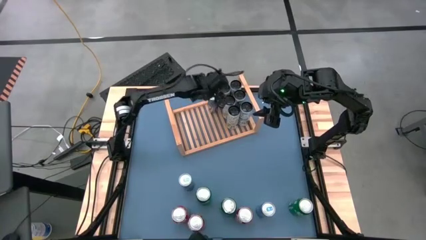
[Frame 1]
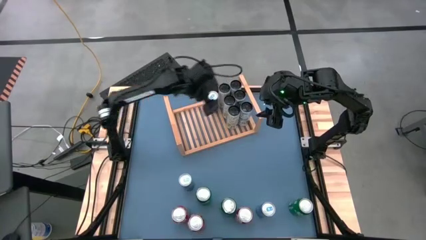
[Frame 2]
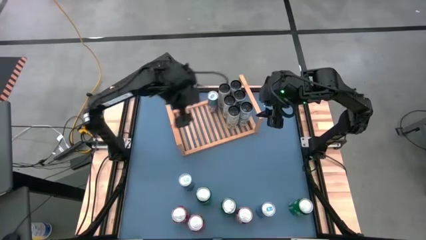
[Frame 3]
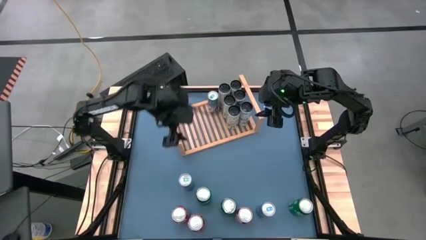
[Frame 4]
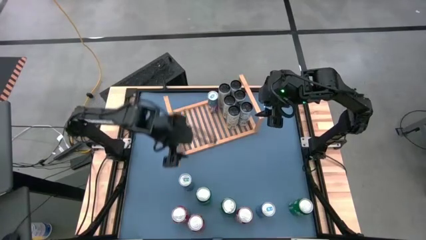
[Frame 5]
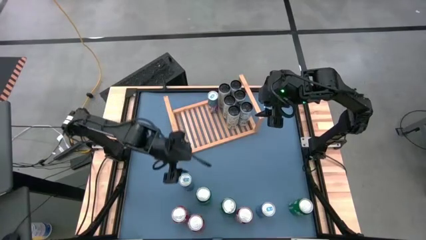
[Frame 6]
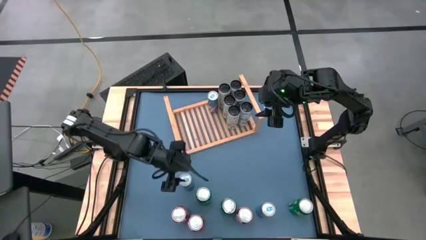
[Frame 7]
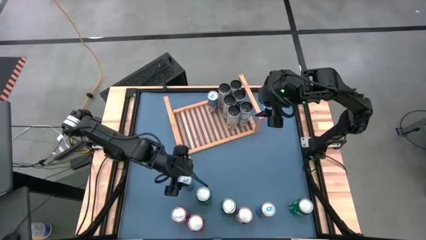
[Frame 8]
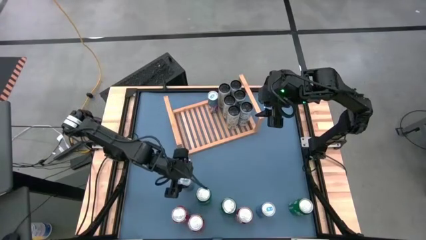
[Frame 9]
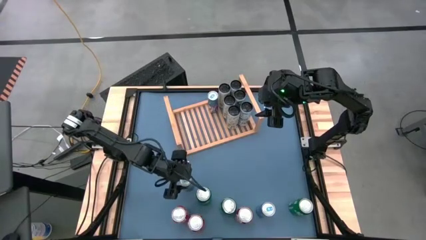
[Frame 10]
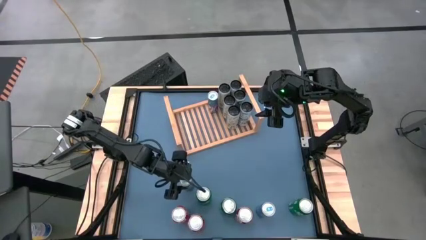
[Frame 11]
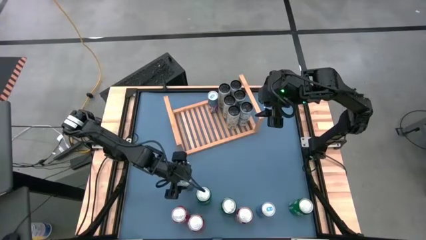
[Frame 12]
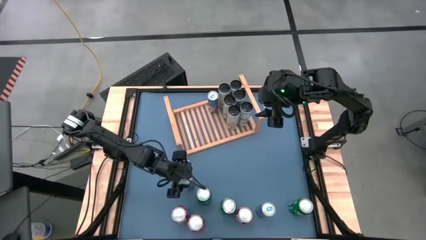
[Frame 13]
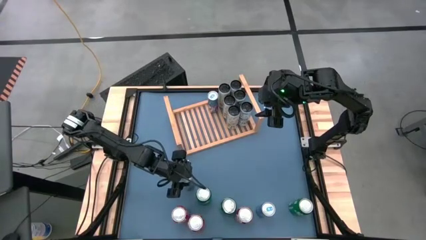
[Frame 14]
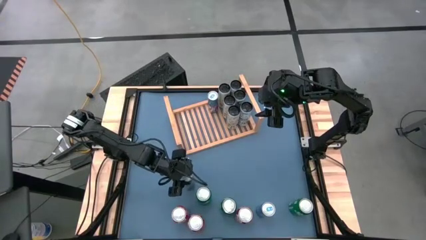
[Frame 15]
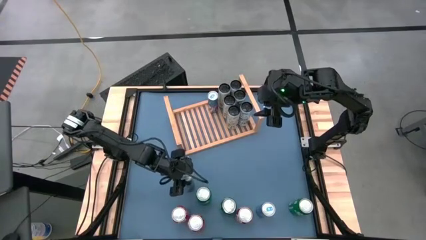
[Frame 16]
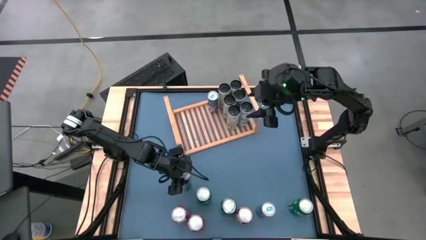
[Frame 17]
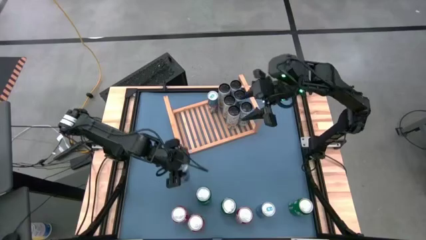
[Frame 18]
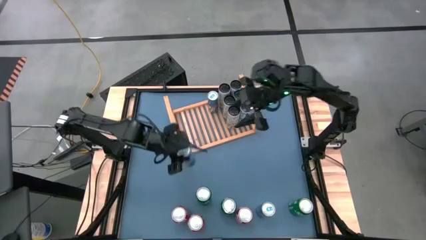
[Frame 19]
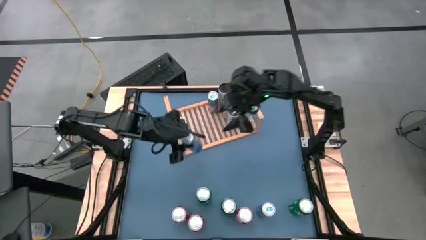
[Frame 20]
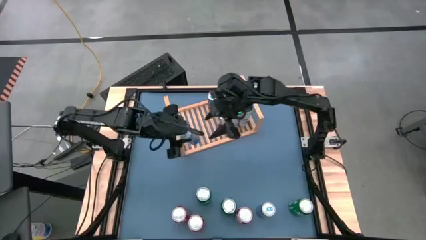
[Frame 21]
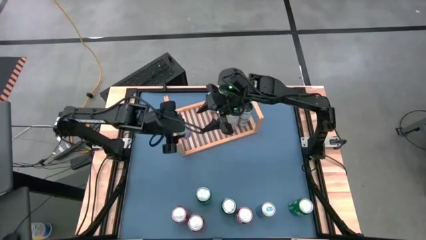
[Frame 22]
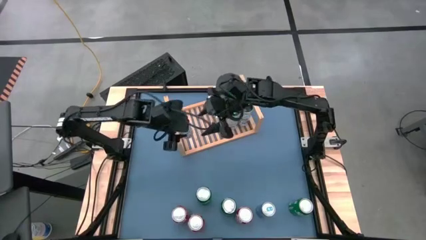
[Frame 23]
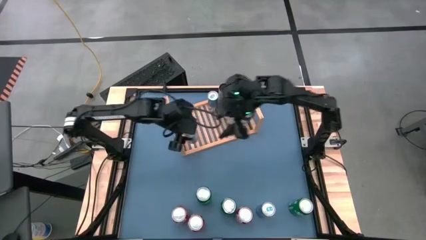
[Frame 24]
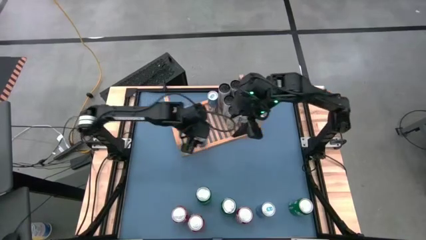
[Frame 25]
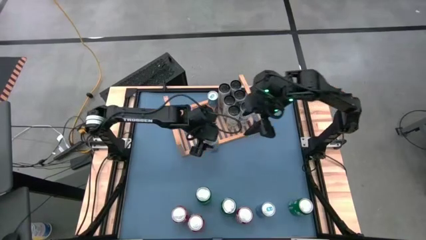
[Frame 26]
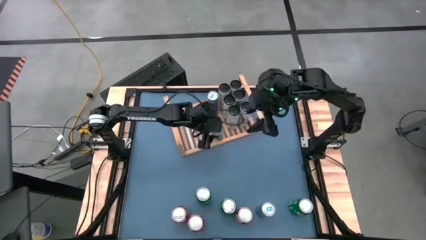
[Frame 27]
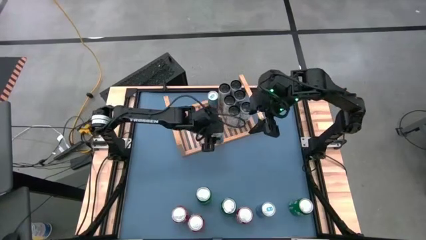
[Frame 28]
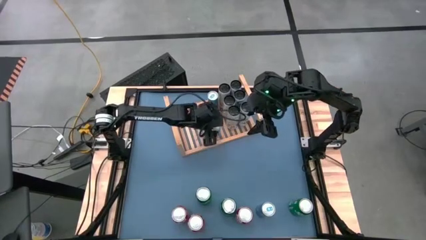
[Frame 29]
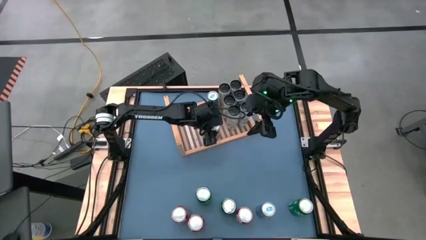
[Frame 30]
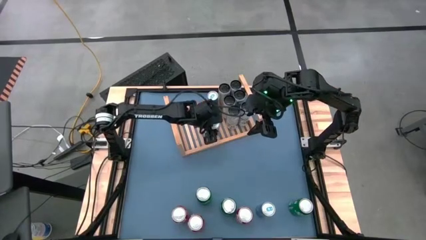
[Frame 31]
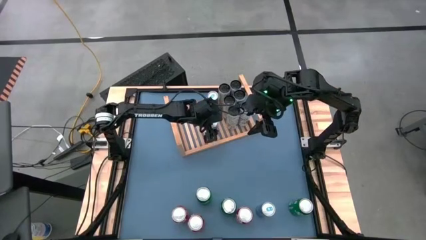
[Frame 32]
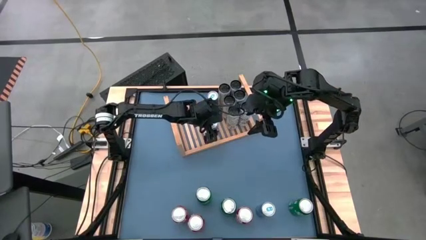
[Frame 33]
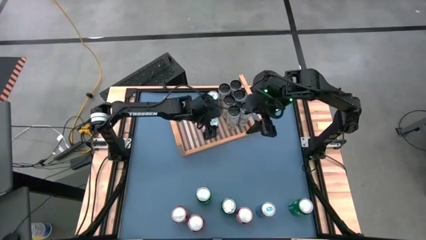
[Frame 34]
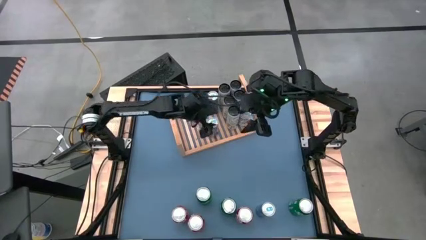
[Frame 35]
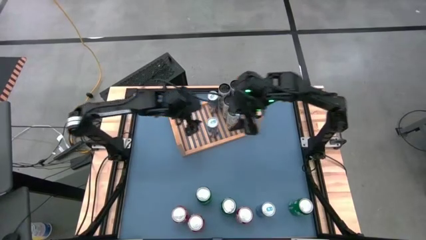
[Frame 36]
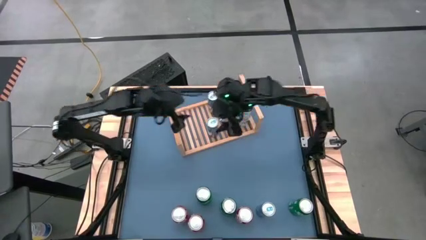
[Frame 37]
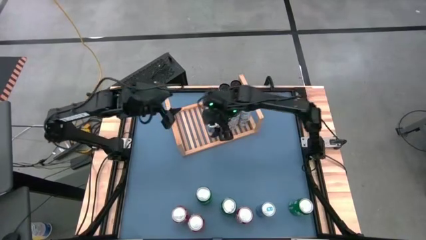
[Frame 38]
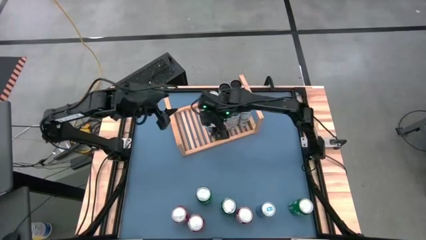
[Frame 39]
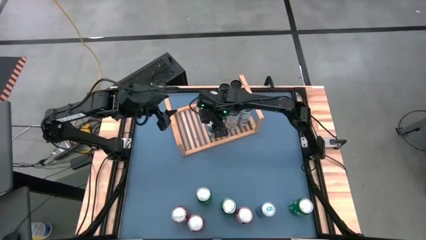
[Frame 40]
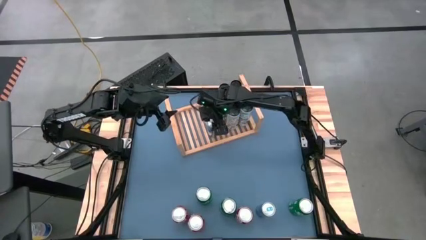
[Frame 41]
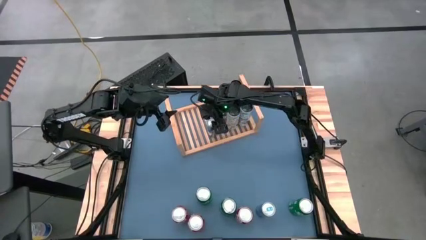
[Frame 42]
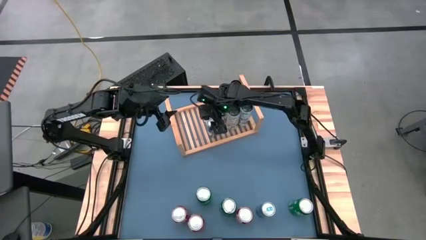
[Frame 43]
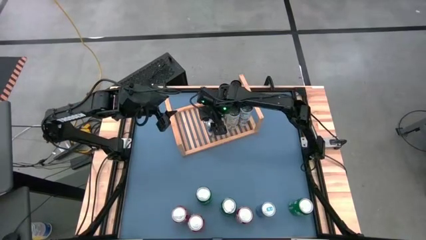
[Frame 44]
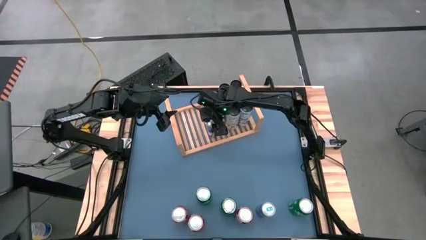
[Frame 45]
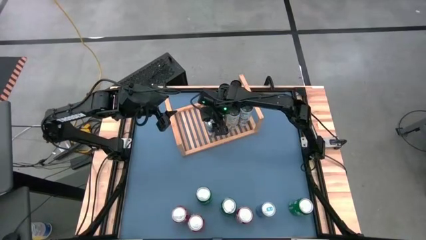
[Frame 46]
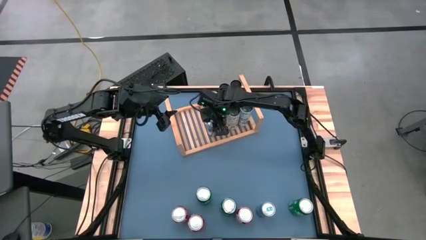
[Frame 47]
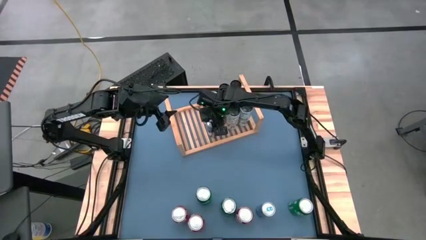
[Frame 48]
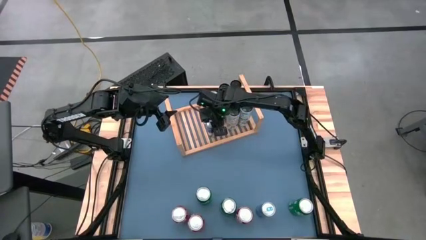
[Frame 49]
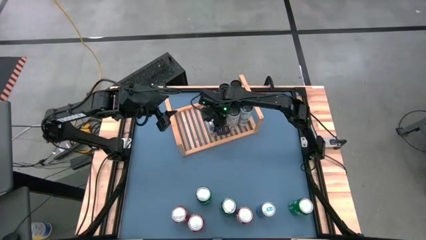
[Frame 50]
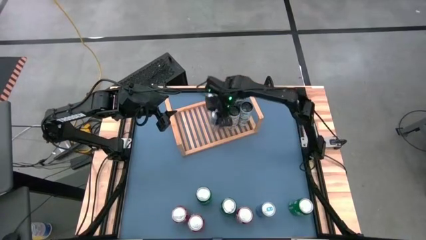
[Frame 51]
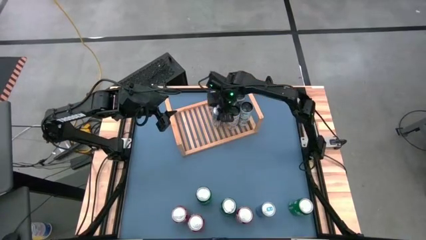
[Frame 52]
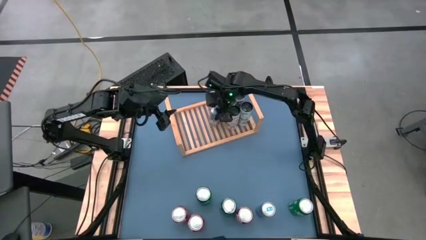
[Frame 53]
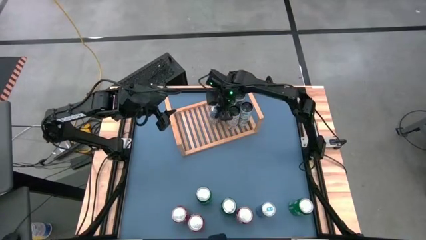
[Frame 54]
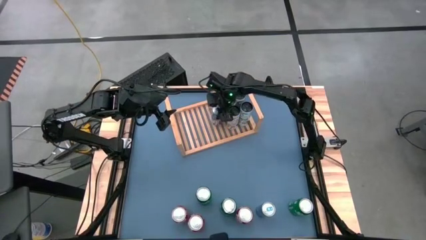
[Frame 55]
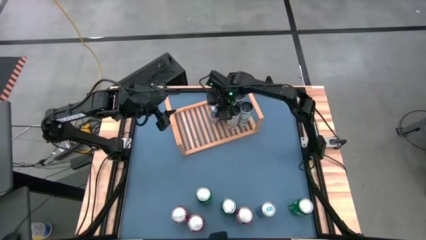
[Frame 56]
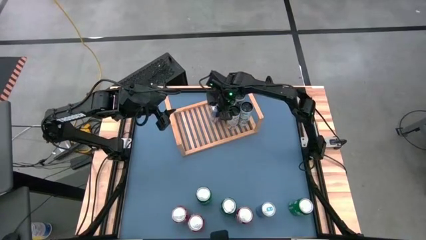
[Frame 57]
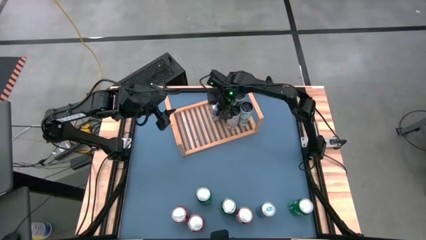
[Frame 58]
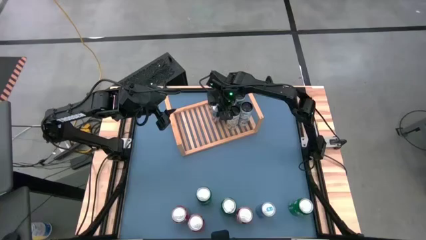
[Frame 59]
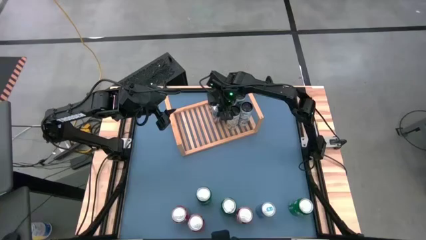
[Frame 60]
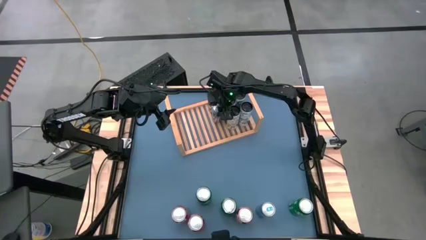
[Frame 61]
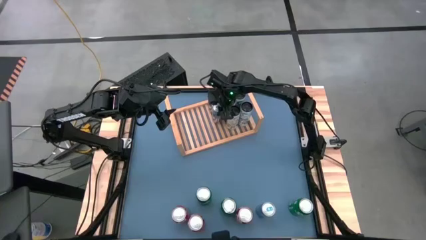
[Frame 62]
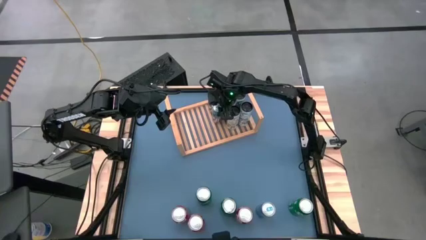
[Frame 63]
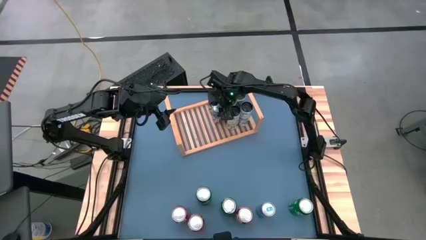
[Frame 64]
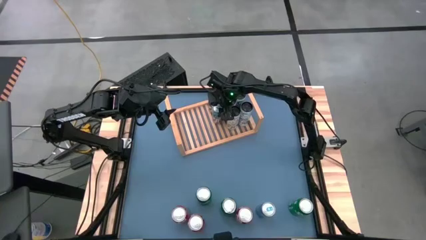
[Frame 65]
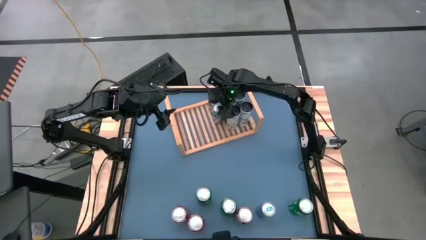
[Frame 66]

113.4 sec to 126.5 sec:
Task: Place canned beverage on shelf
Put the blue soda can on the shelf aligned with the other blue soda can
